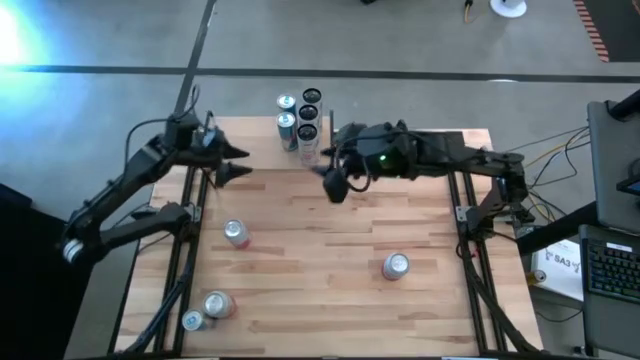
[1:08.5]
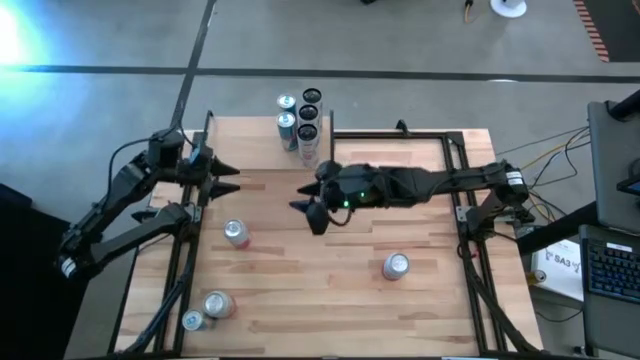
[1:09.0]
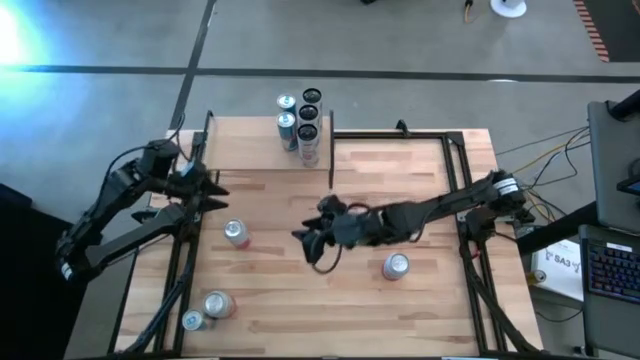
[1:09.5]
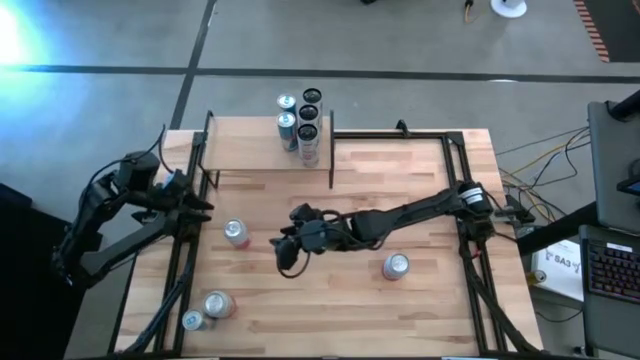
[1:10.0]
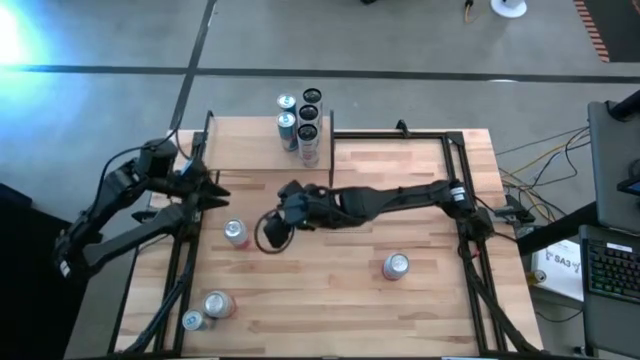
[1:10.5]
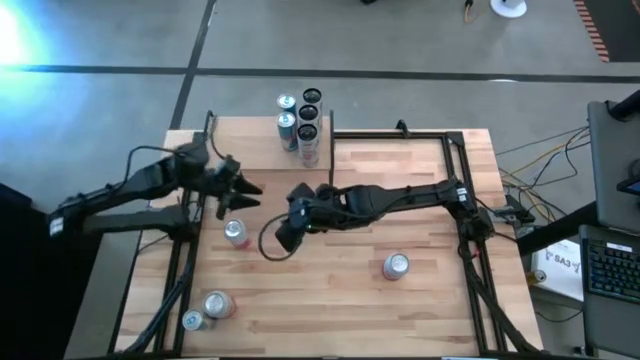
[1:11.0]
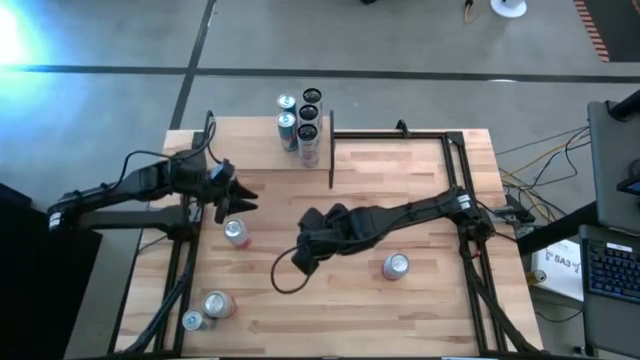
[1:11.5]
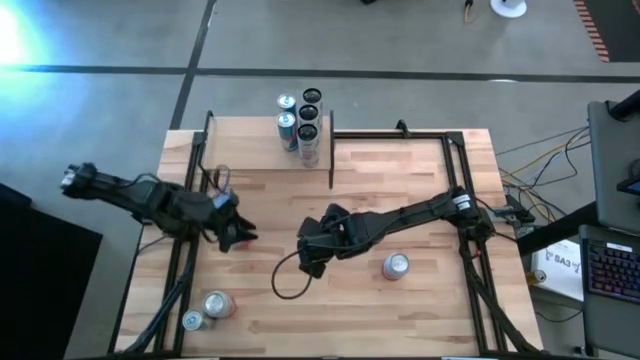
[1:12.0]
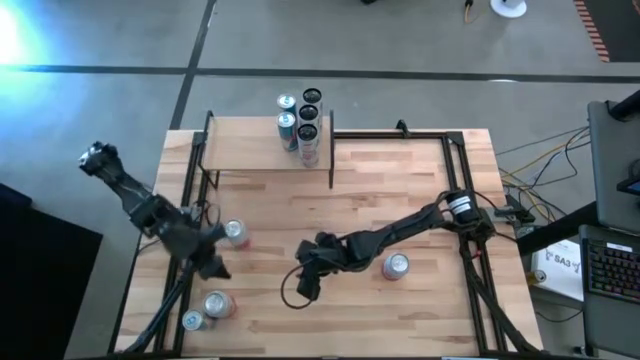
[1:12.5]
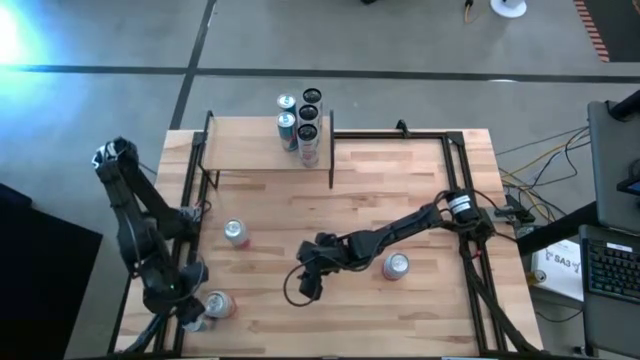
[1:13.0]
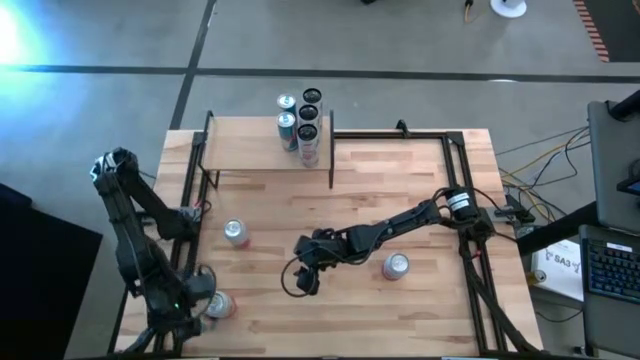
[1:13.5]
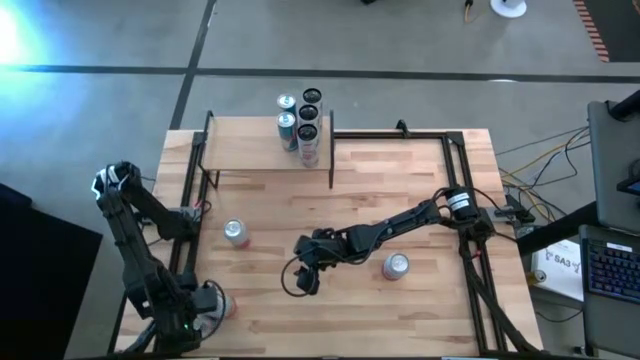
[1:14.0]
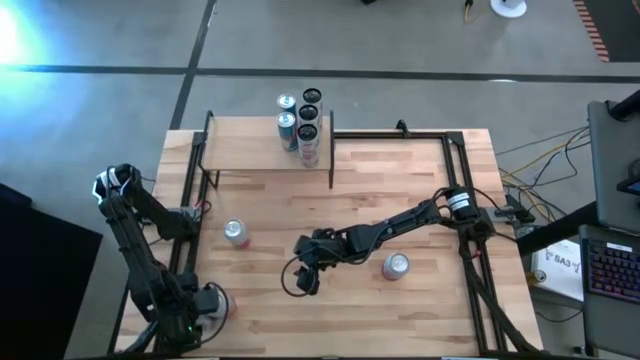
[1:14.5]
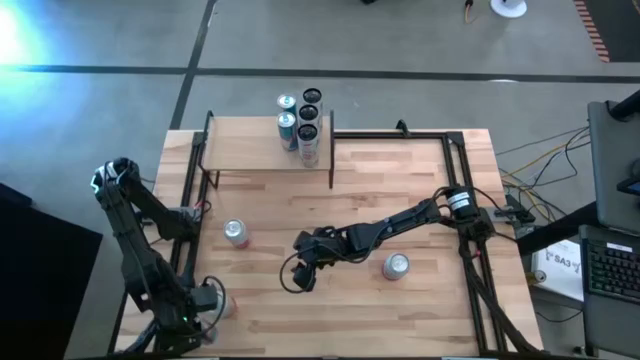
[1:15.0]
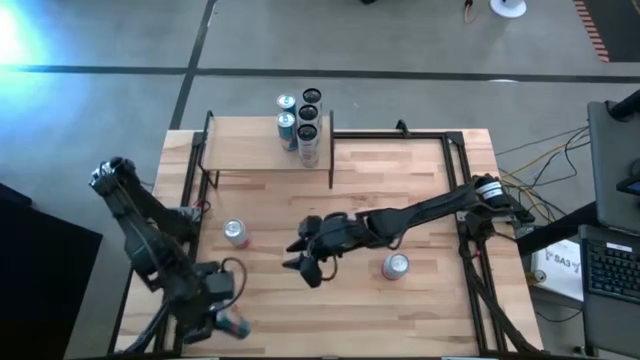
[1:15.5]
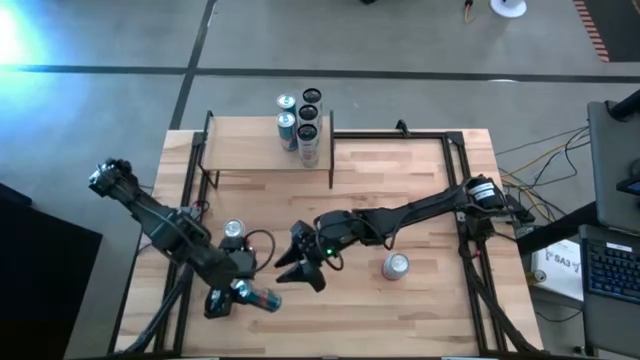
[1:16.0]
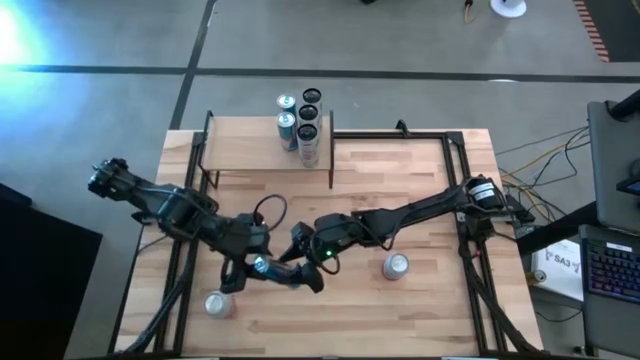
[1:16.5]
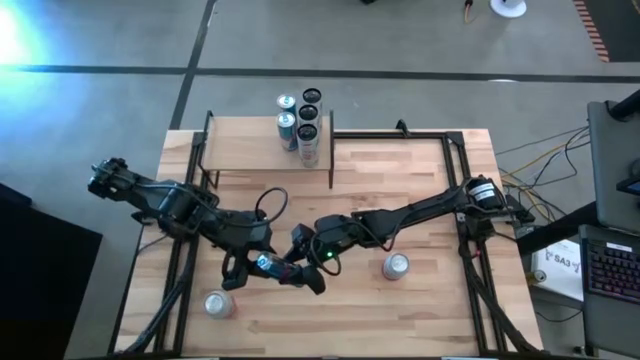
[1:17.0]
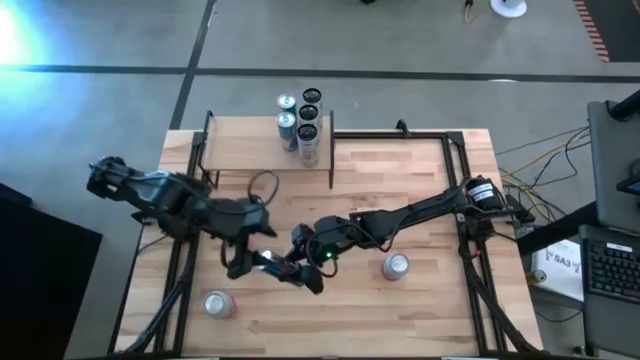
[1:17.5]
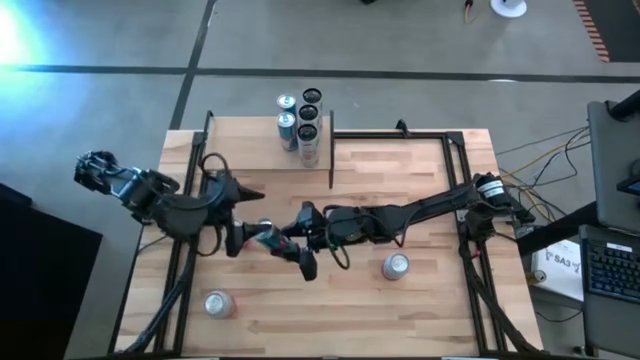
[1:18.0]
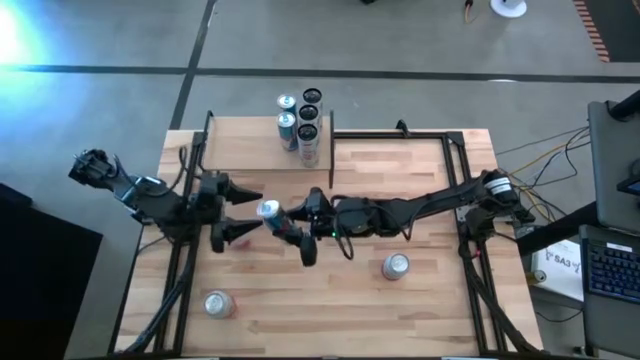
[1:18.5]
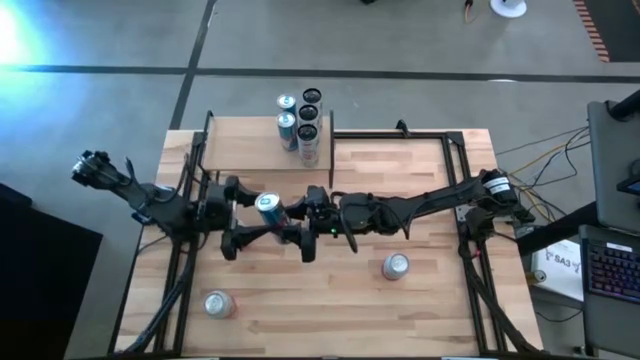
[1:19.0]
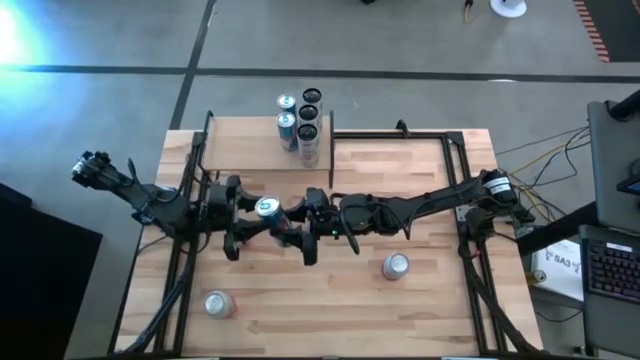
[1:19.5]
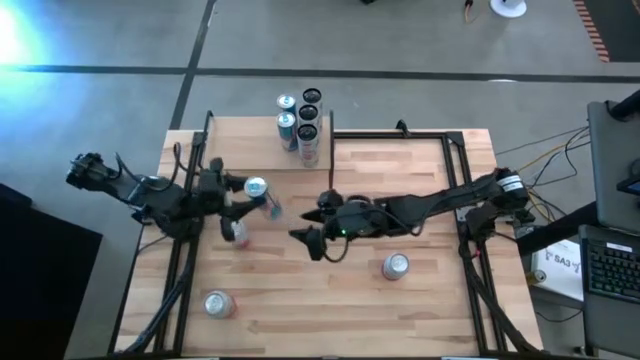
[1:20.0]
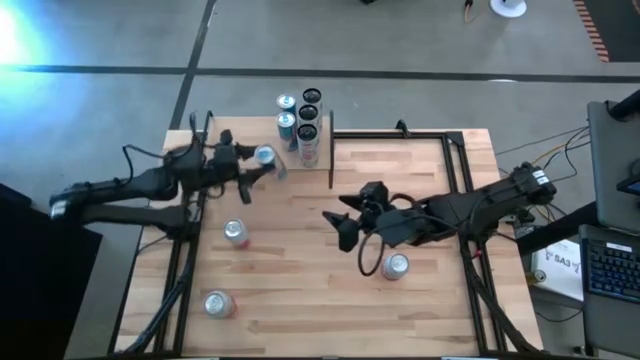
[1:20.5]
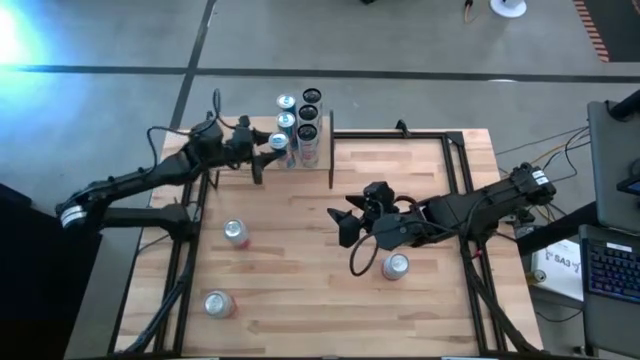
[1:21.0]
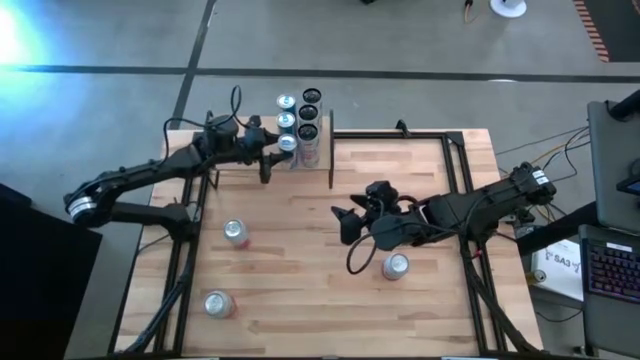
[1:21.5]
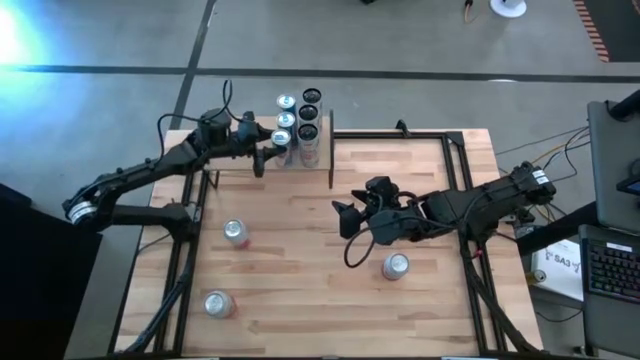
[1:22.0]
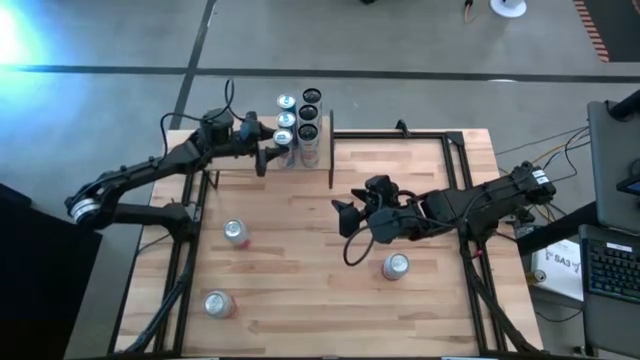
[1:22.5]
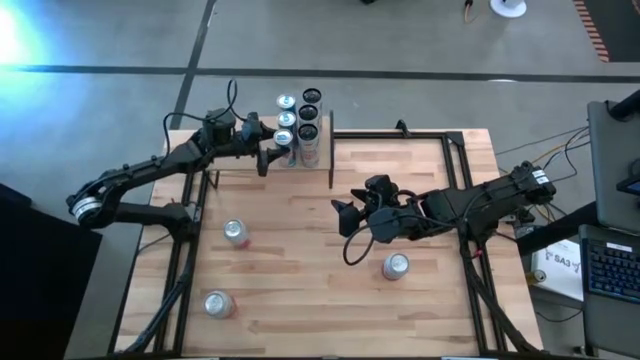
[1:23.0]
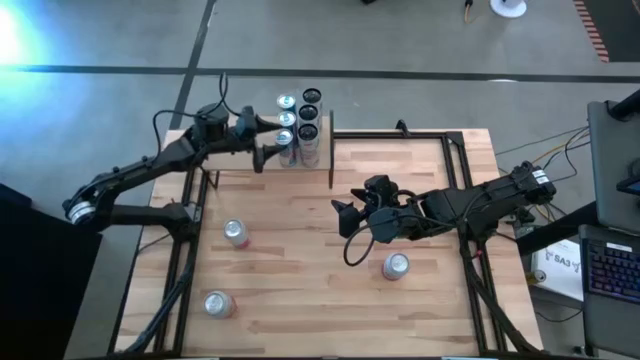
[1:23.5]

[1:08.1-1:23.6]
Task: Place canned beverage on shelf
Put the blue soda can on the shelf aligned with the other blue soda cans

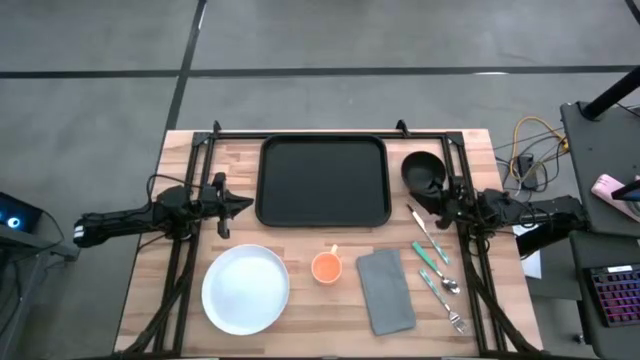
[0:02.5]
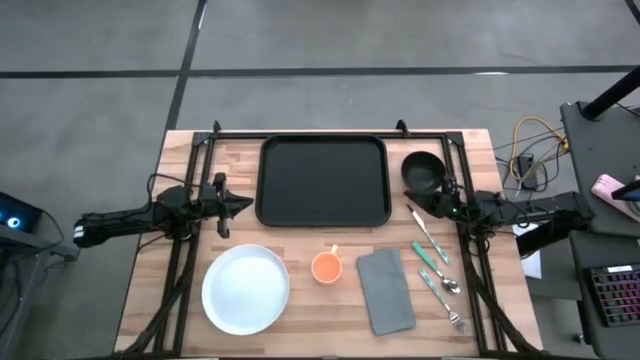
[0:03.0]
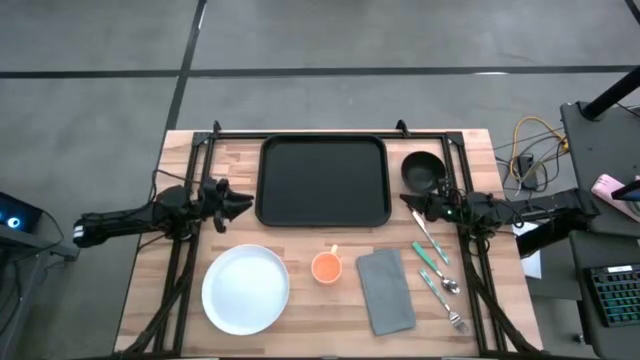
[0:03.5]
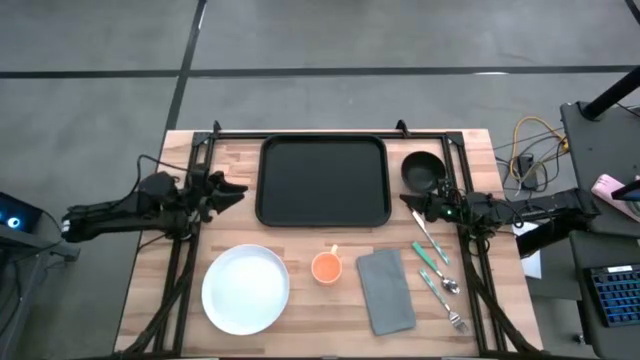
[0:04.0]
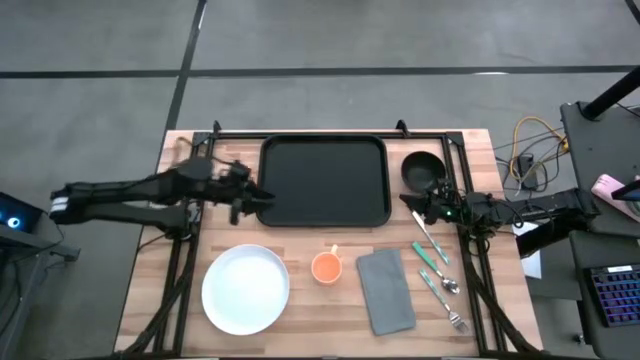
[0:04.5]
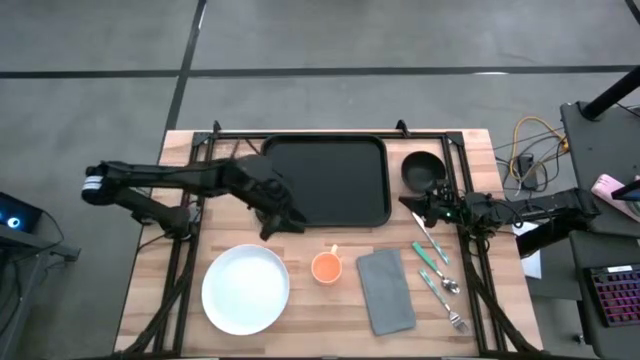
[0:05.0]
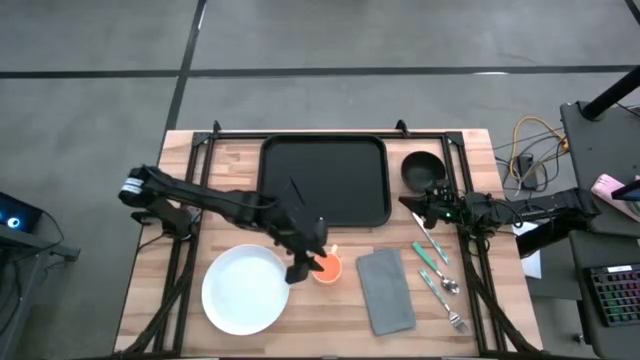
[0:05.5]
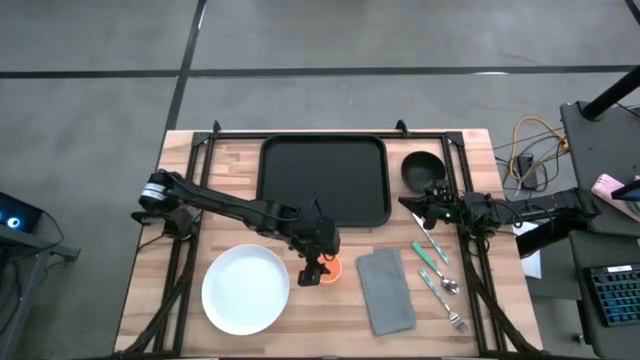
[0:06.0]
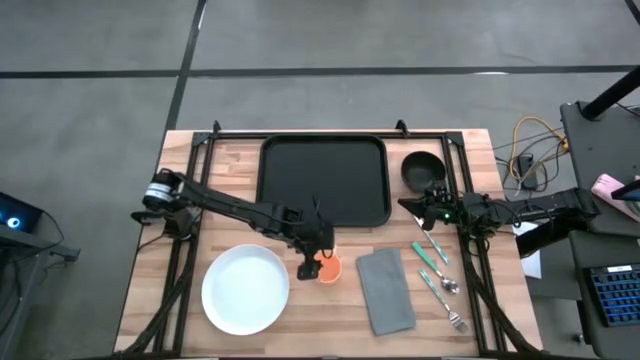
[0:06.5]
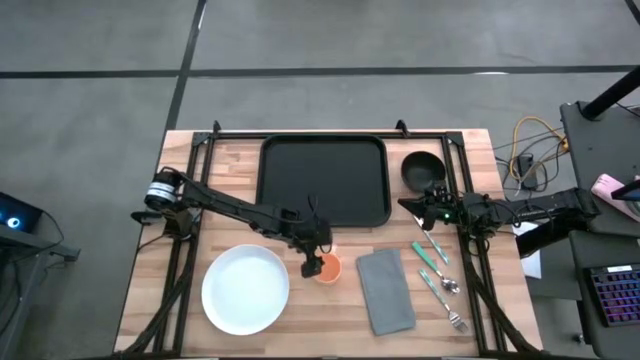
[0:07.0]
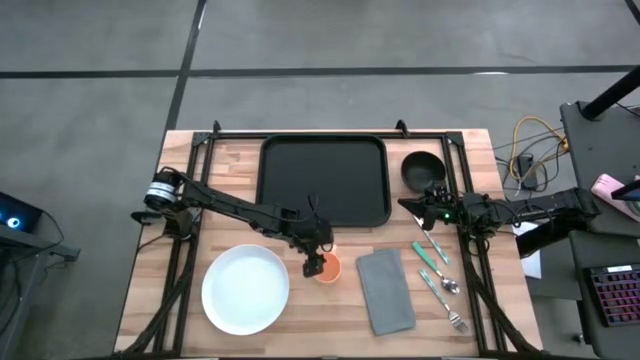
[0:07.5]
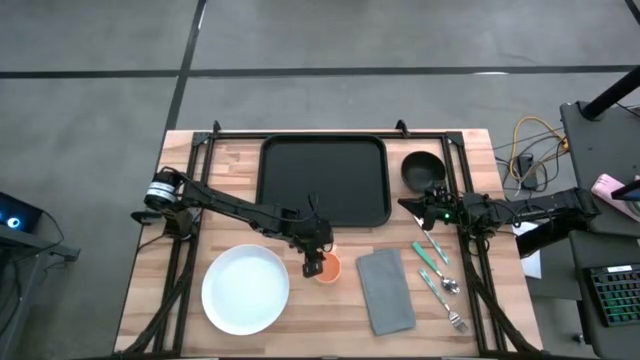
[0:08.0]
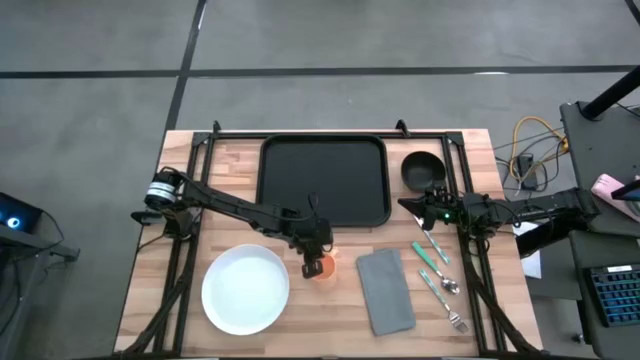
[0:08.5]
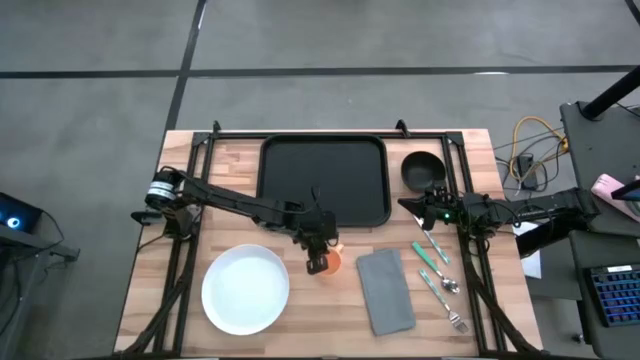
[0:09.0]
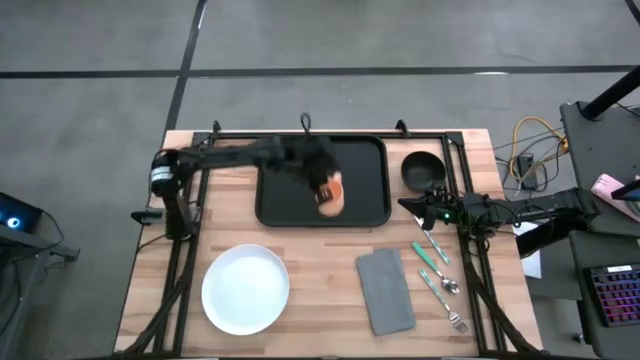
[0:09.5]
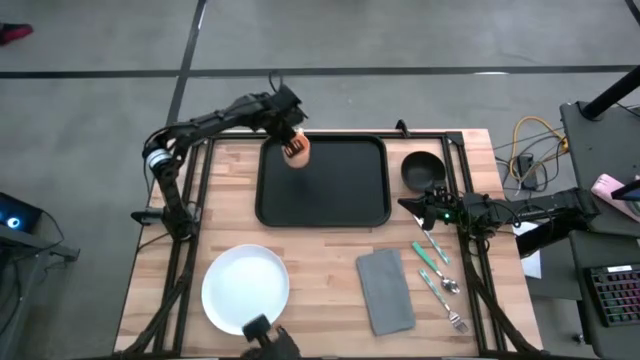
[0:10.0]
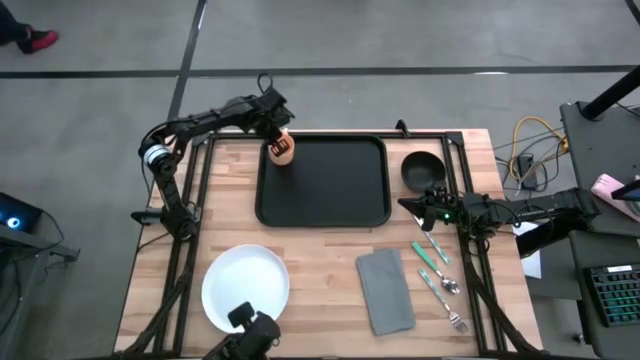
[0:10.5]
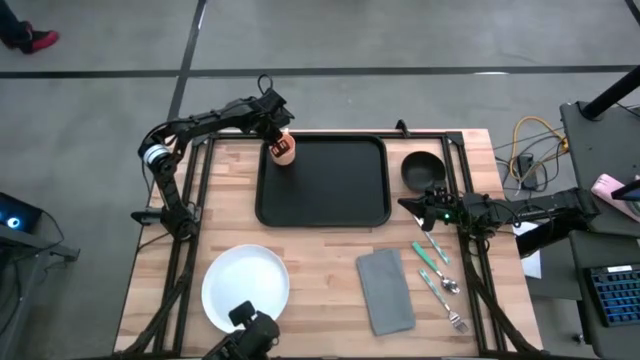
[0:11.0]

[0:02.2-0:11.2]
Task: Set up tray
Put the light orange mug on the black serving tray
